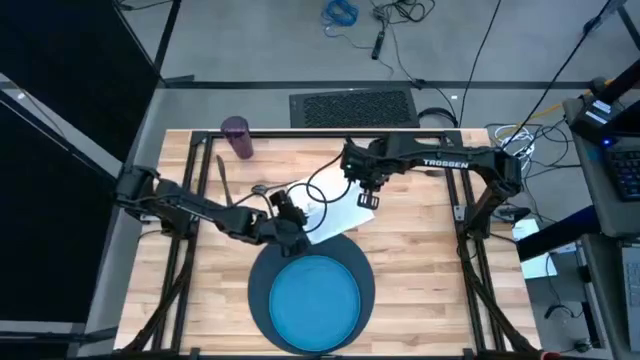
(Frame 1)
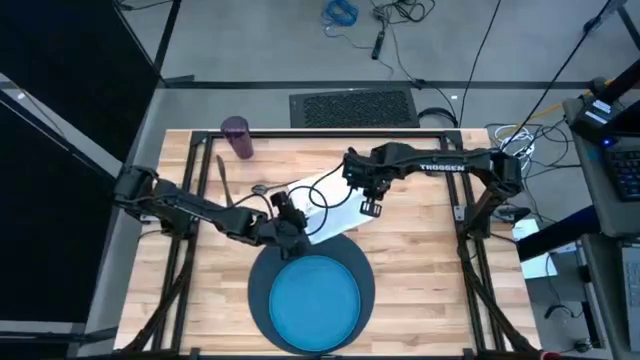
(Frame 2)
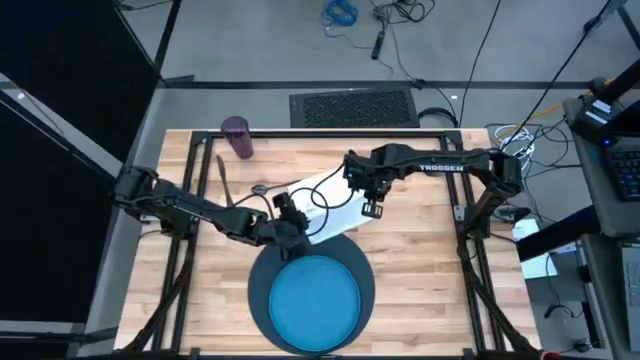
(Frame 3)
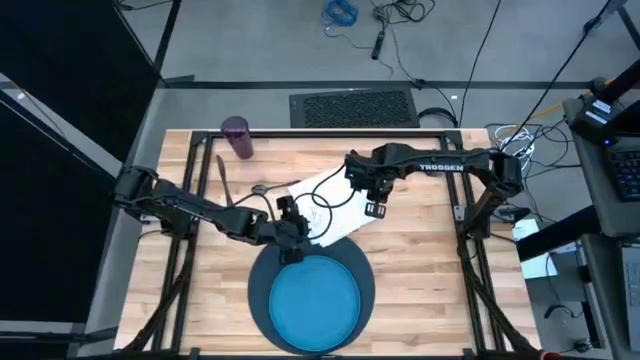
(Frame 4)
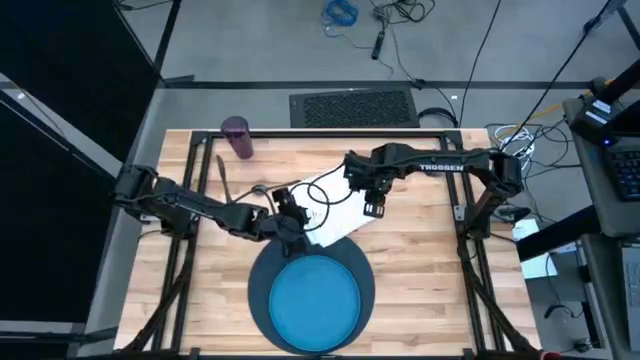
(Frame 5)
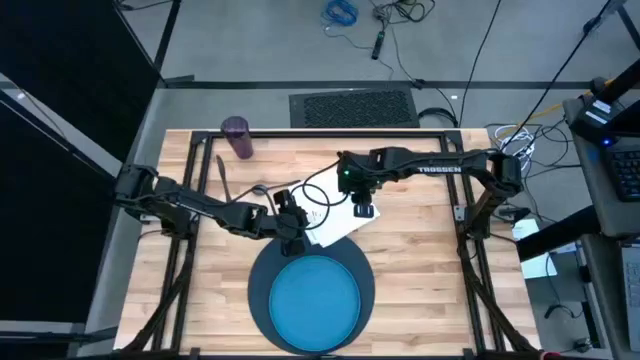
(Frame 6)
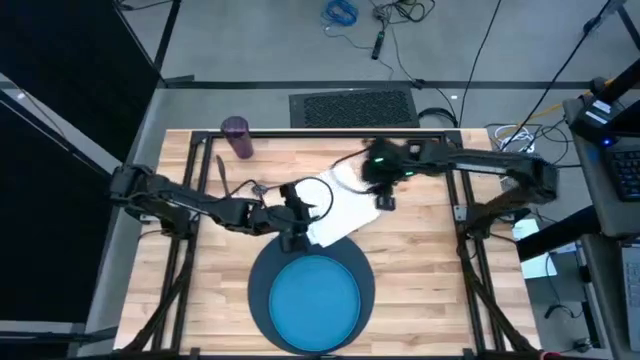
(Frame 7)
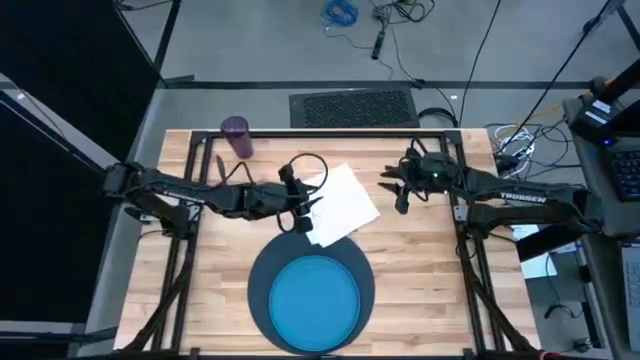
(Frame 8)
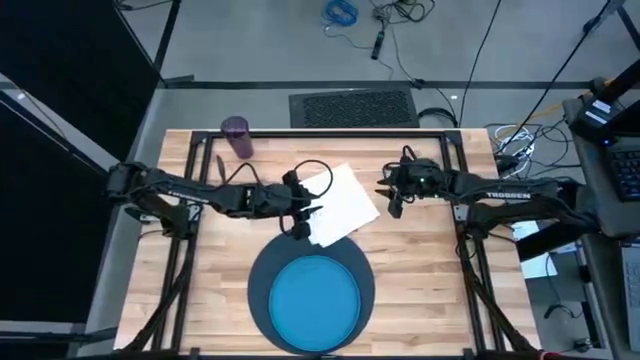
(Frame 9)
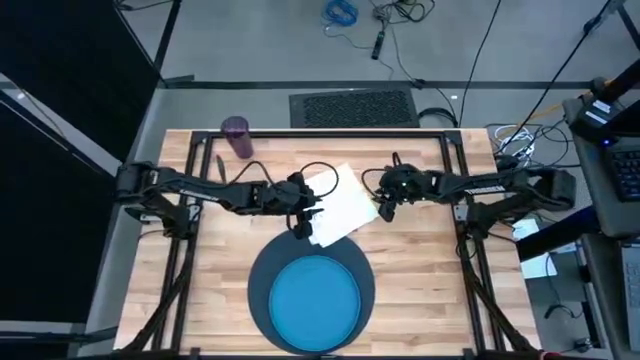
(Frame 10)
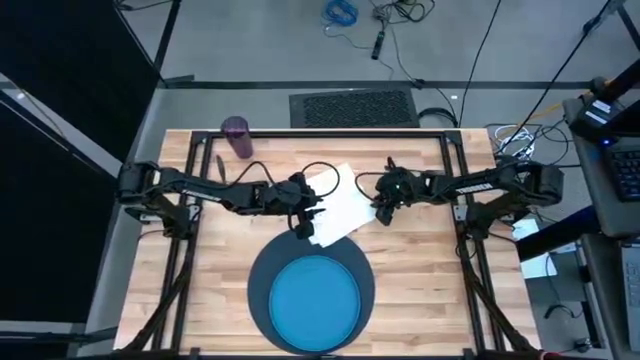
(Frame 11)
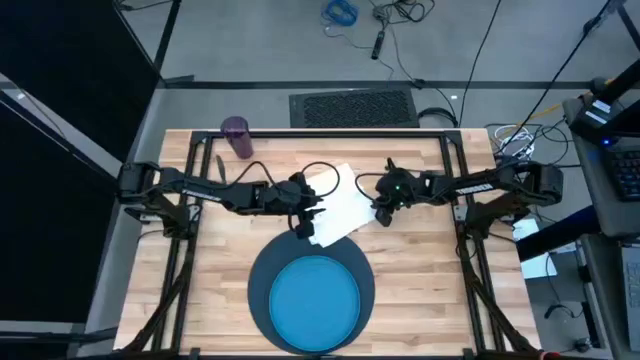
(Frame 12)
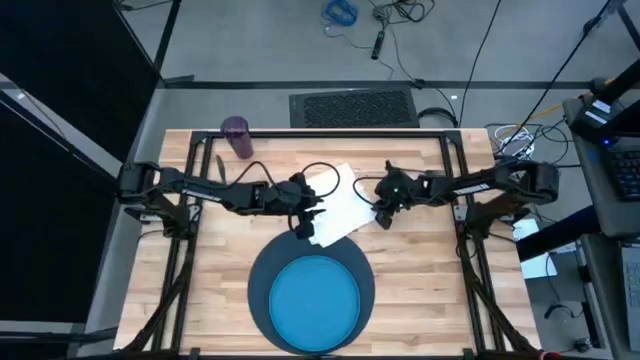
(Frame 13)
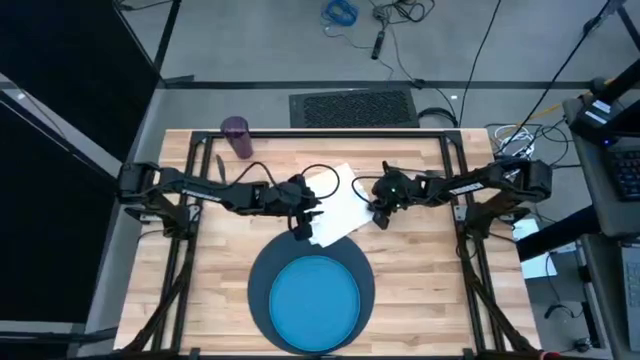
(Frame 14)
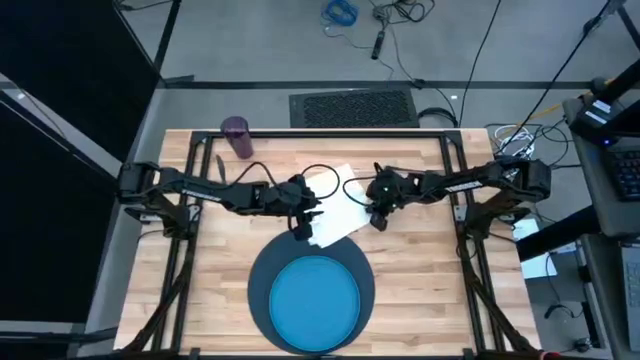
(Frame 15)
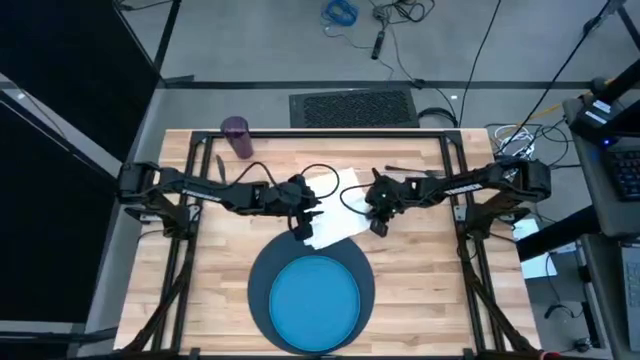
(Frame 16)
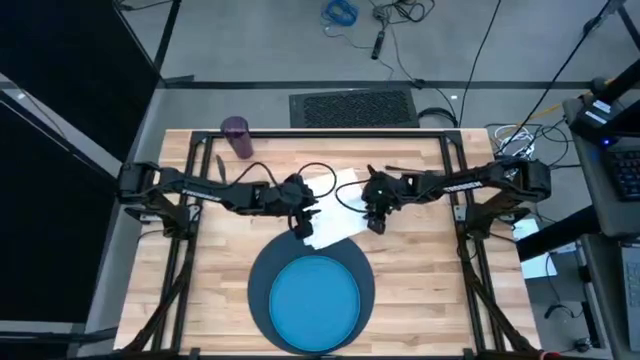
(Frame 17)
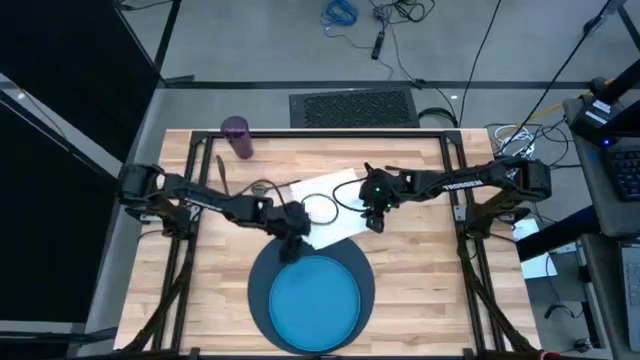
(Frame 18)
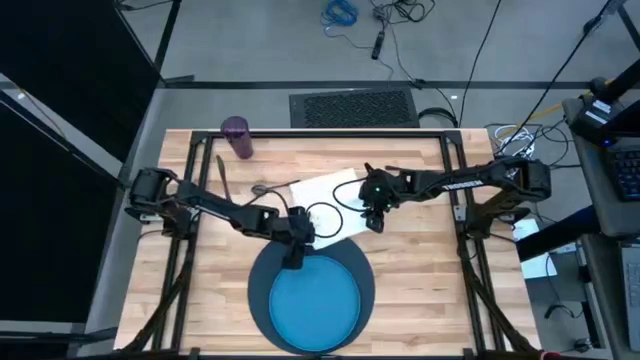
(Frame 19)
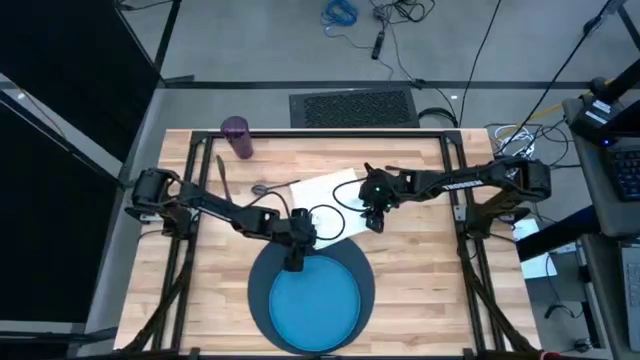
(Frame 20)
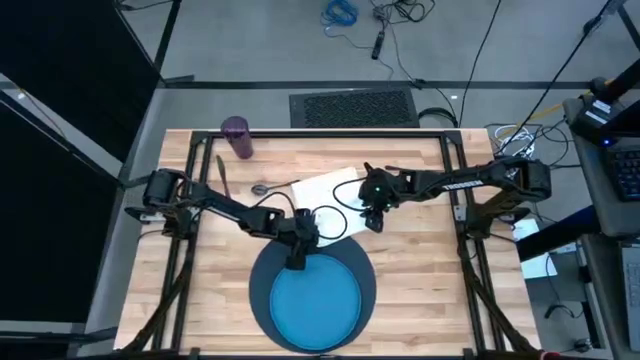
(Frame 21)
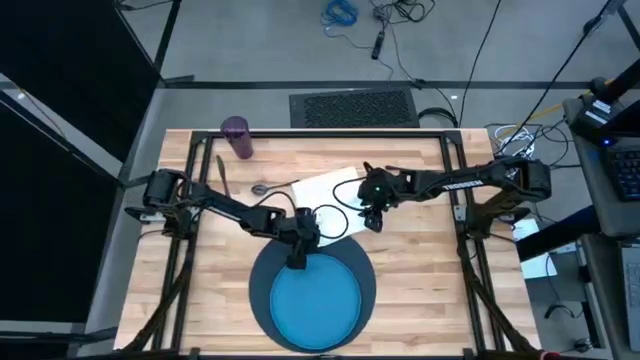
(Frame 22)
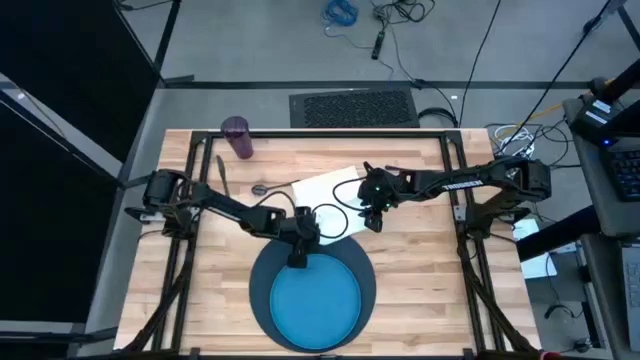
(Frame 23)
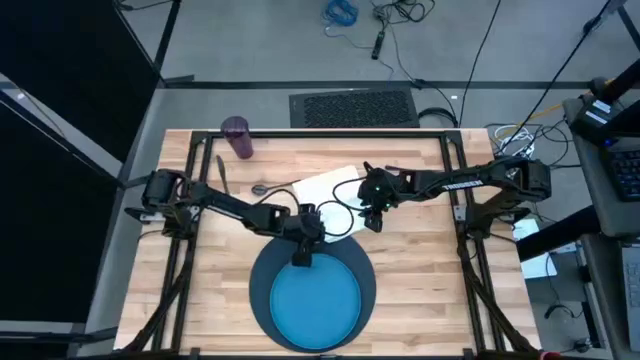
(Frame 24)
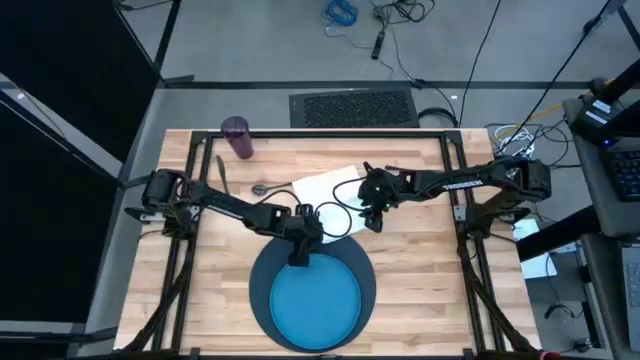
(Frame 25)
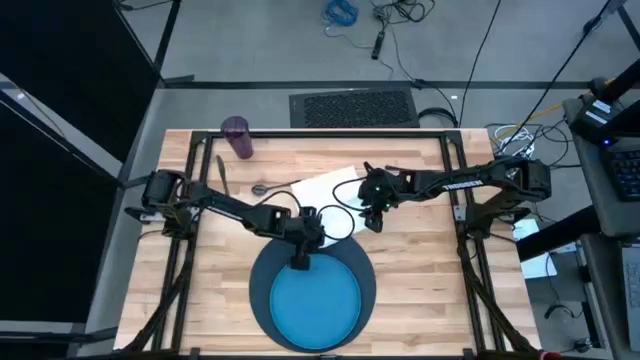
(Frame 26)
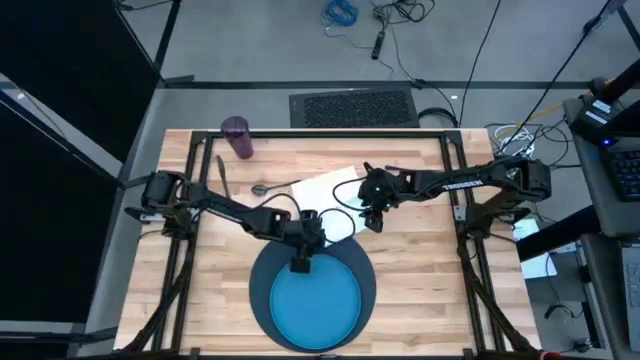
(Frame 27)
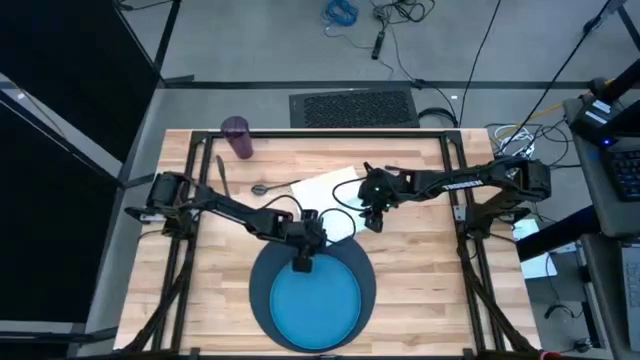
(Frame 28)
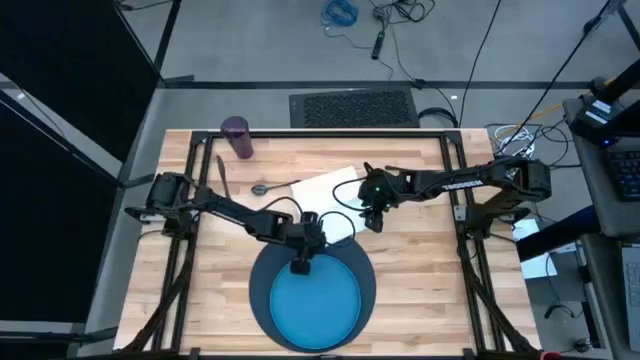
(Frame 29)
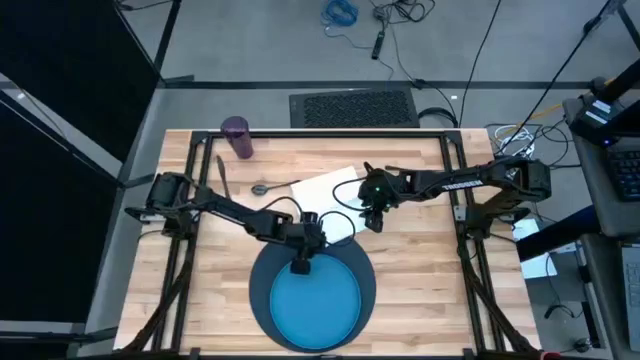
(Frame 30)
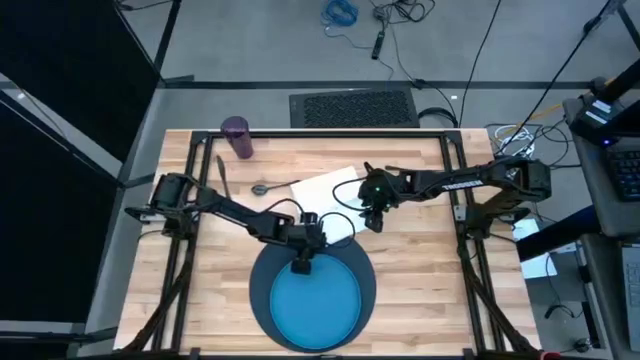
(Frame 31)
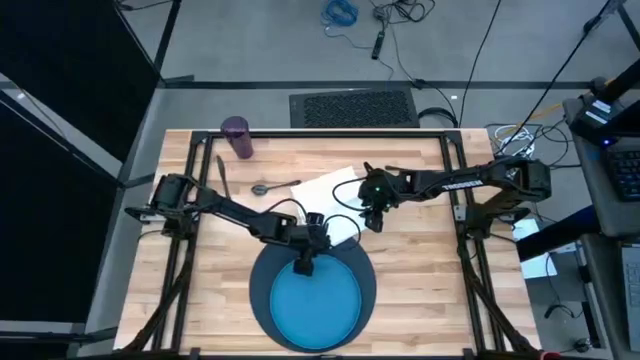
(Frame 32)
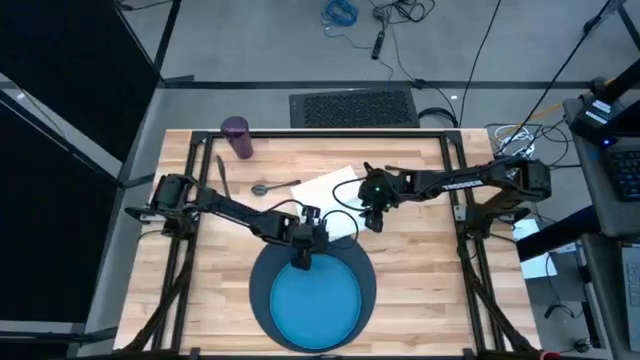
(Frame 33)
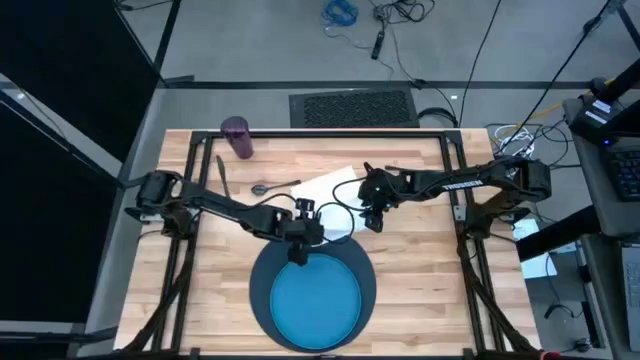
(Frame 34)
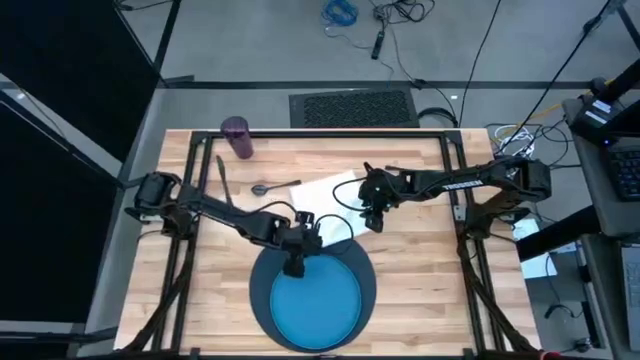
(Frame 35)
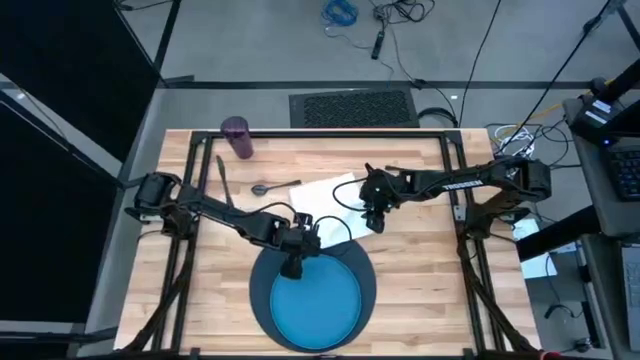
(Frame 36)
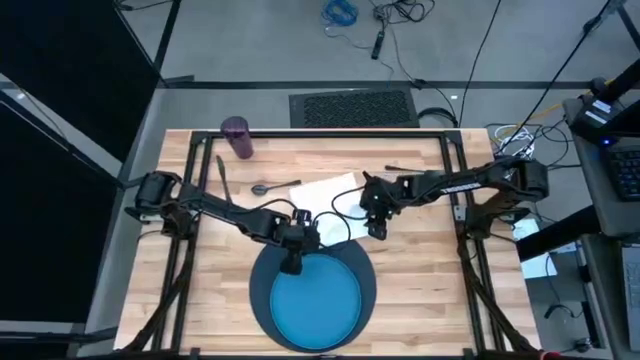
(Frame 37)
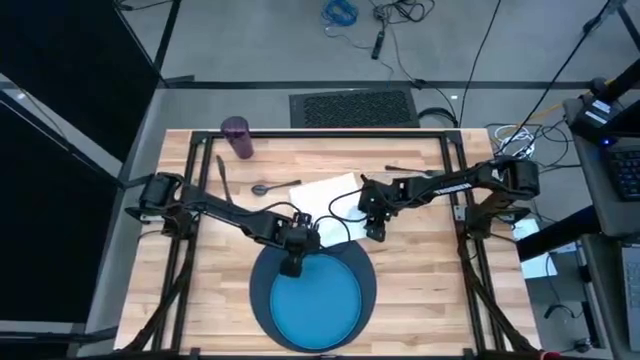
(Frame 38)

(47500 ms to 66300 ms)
Task: Set table place
Fold the white napkin
